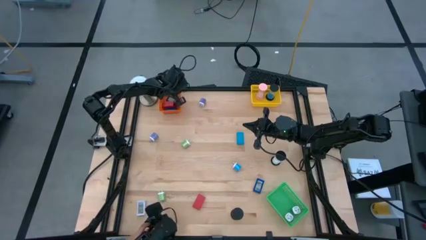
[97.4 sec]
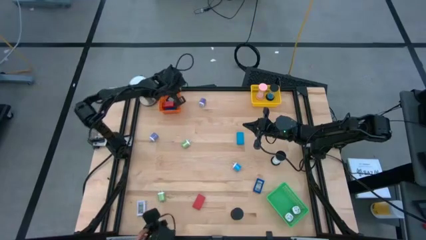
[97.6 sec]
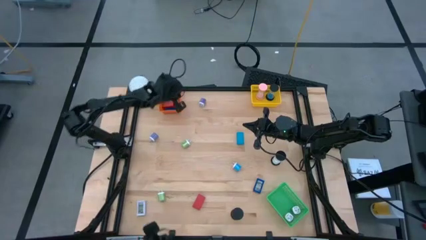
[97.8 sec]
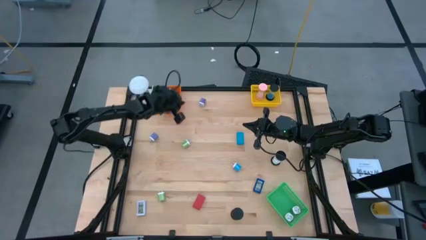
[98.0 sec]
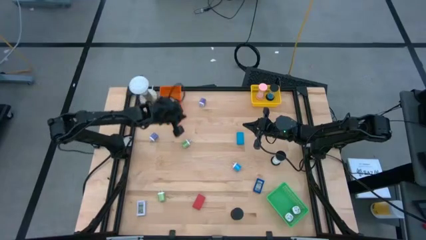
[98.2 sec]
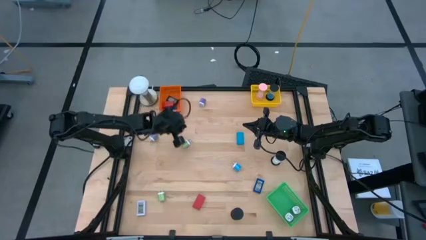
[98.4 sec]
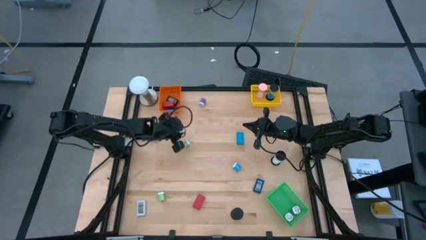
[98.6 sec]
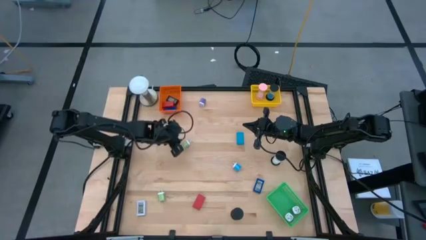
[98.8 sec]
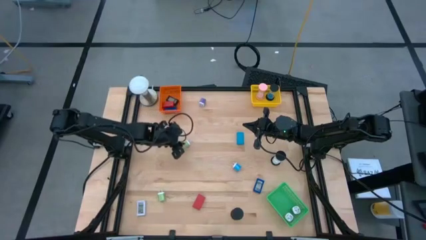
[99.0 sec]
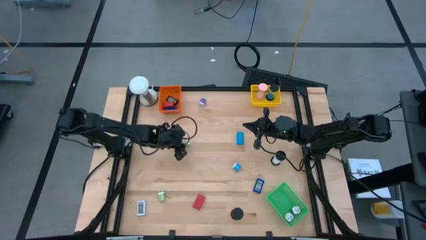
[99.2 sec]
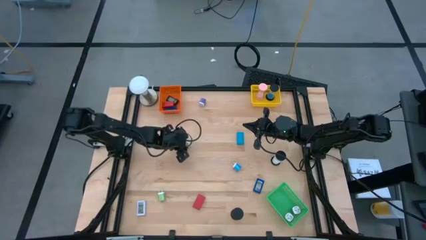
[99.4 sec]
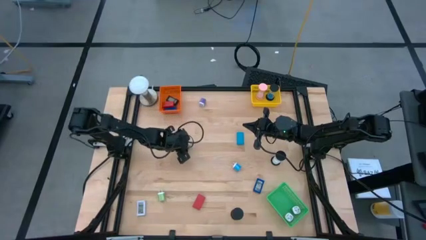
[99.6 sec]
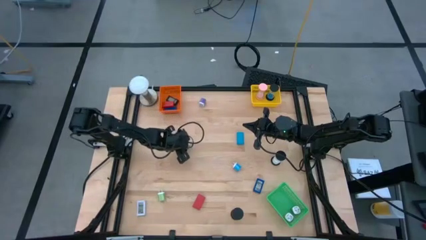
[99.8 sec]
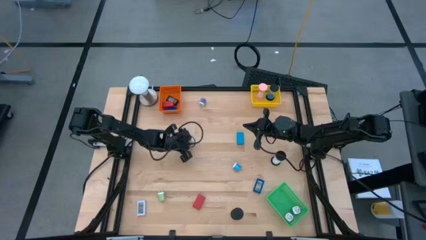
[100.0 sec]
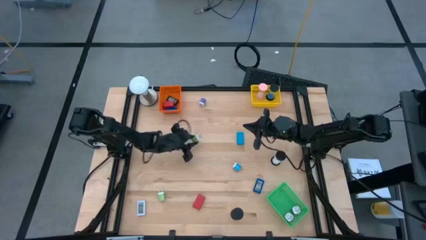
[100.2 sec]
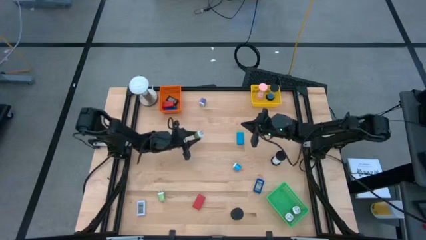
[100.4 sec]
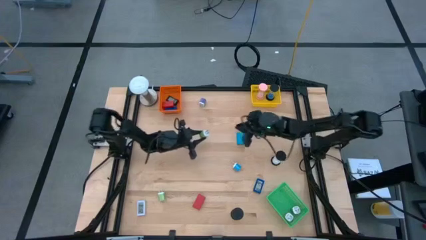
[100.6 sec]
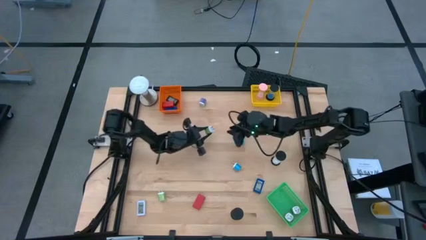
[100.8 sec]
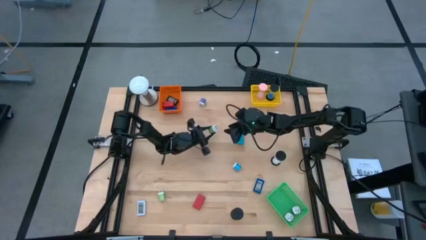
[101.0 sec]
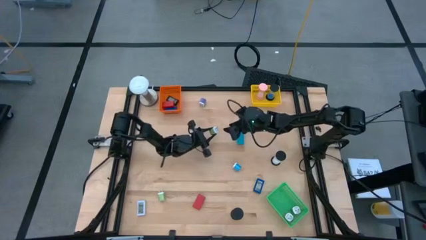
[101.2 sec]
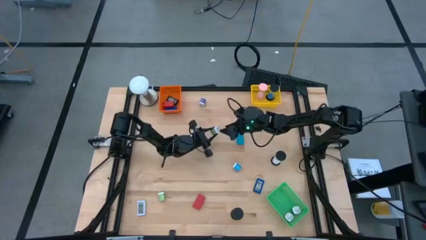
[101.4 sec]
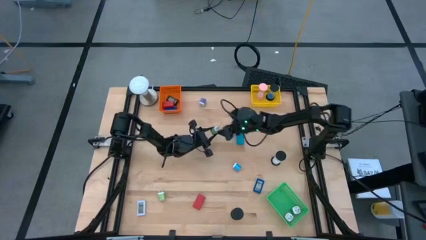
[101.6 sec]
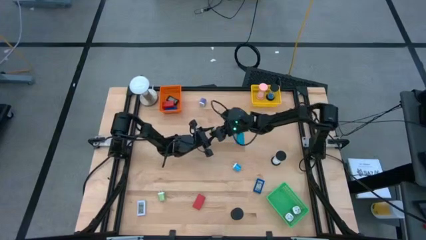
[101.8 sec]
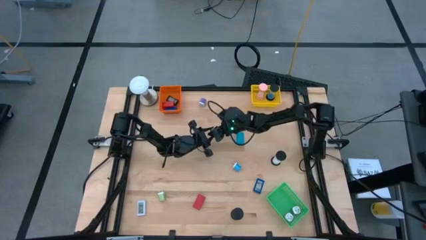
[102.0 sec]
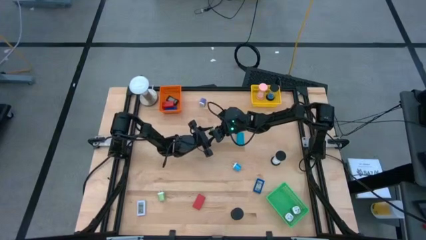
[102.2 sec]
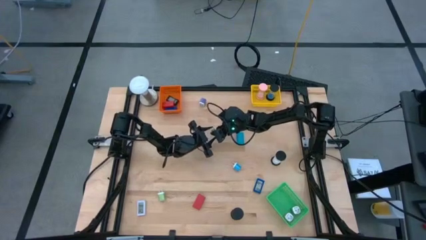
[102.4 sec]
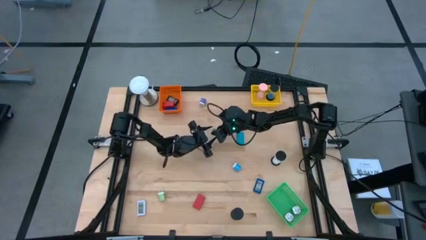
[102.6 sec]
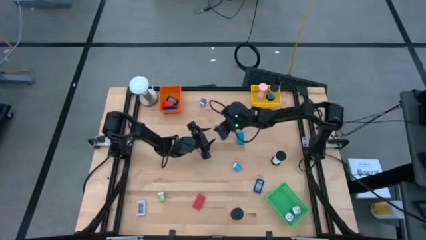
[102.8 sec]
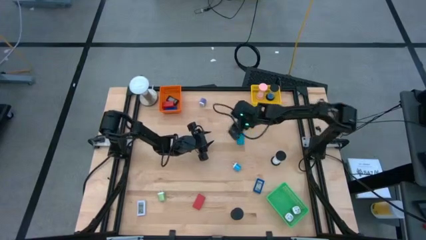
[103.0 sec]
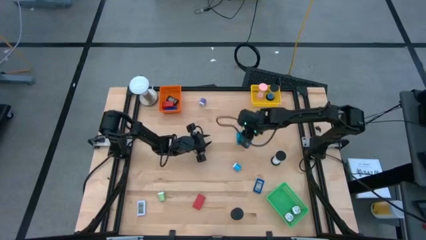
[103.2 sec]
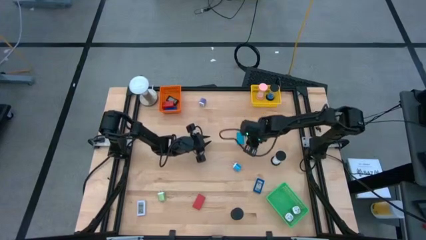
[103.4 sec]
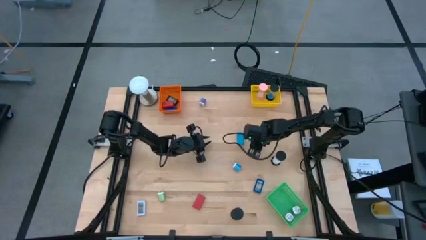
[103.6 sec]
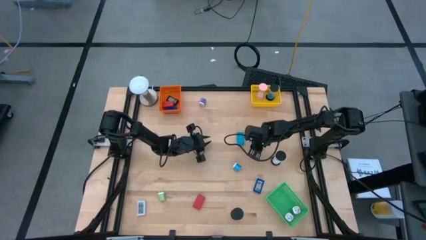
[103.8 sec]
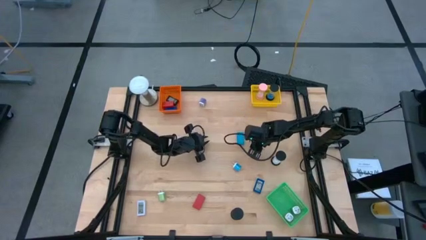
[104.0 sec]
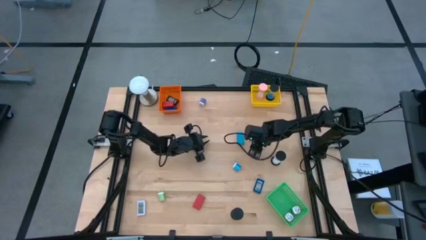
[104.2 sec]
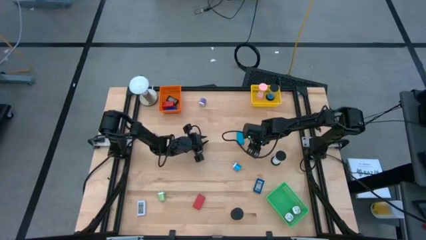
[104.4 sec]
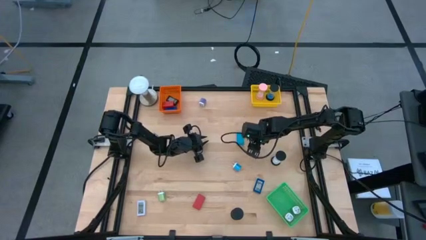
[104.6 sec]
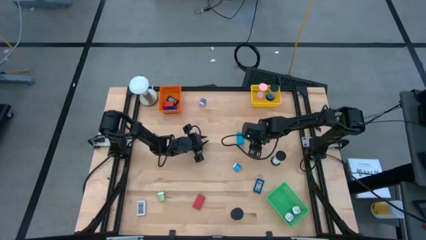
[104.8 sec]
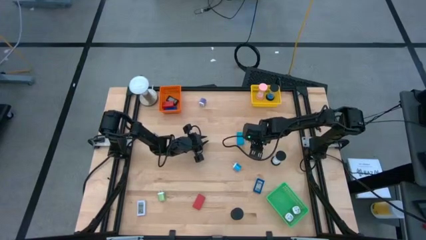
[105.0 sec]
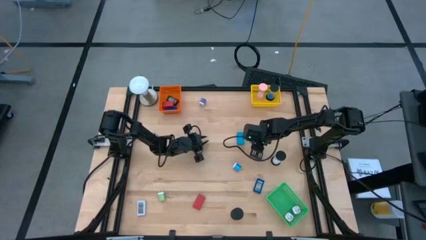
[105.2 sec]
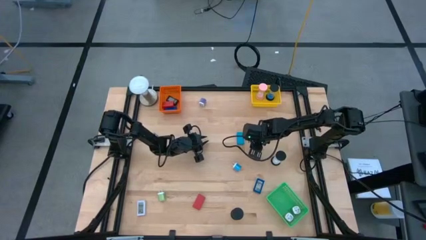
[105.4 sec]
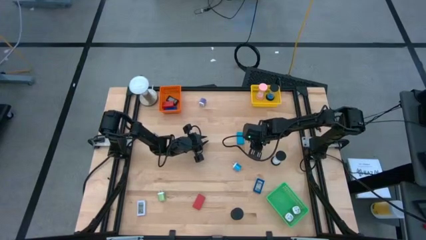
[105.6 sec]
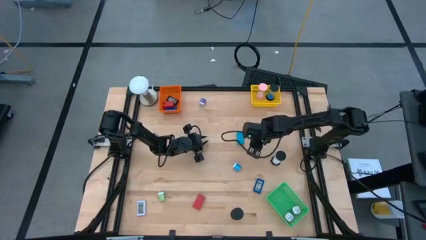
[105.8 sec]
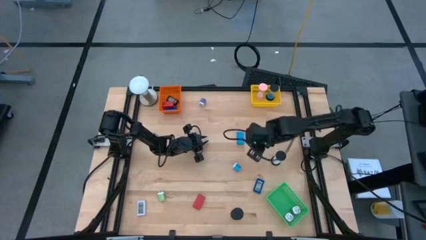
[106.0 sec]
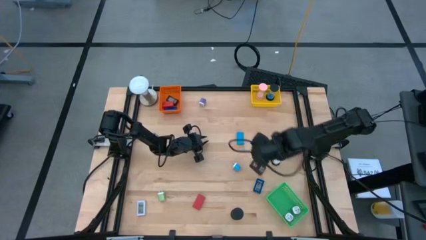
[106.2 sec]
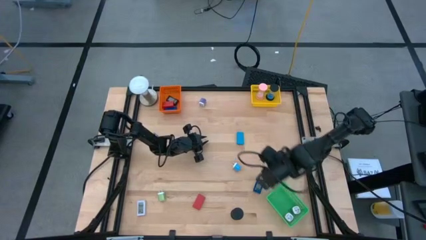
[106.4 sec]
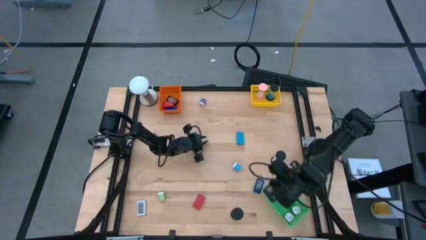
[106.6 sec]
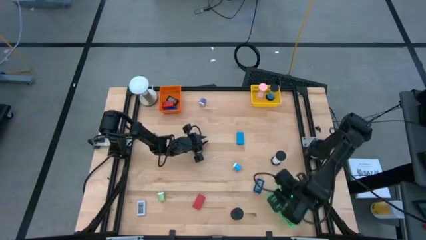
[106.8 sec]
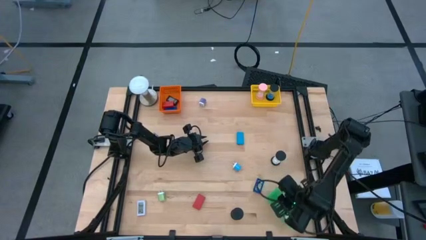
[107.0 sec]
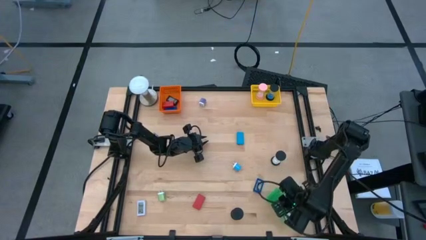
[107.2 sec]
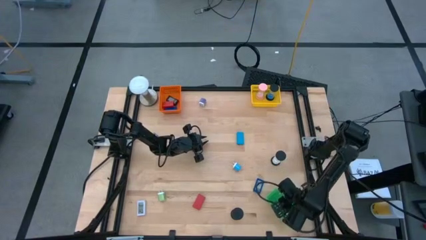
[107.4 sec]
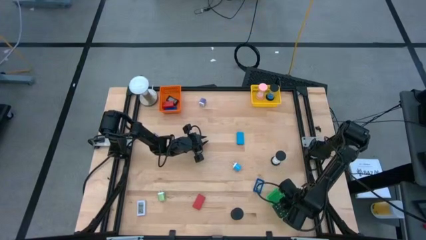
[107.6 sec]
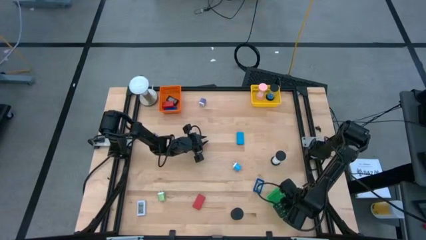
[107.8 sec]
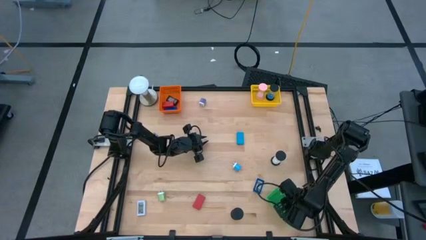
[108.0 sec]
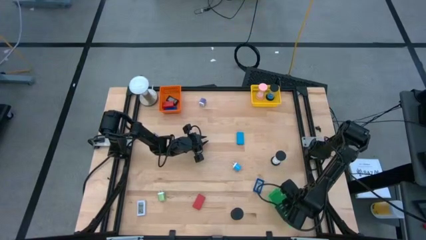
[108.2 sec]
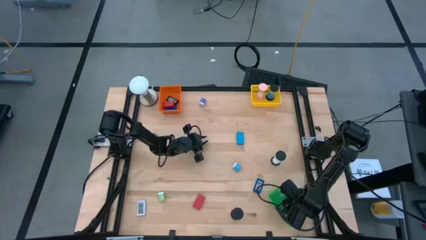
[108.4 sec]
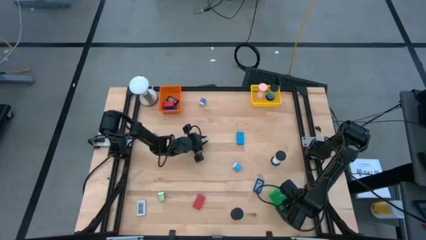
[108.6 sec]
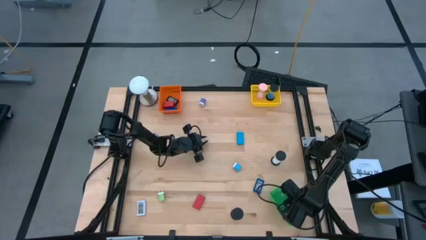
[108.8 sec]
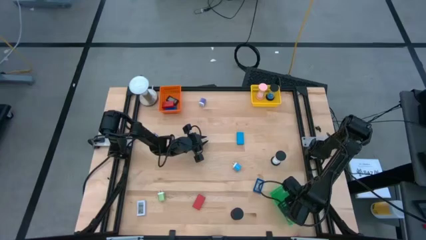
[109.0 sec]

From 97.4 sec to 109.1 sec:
Task: Pick & Place Office items
Put the top green charger adapter into the green bin

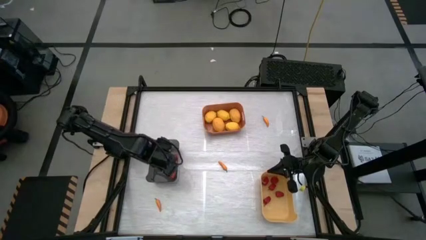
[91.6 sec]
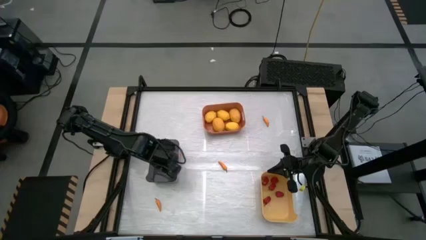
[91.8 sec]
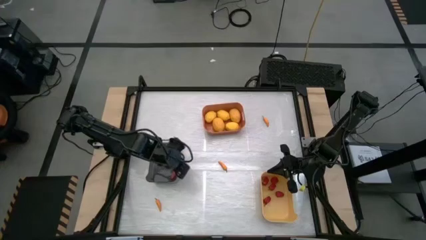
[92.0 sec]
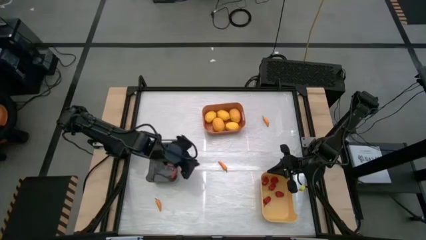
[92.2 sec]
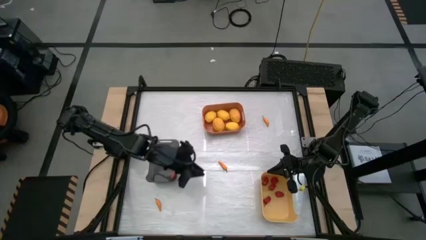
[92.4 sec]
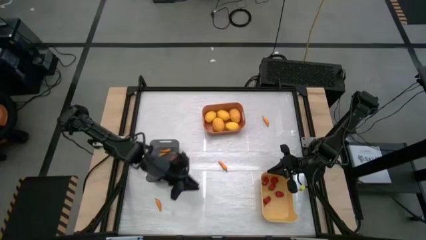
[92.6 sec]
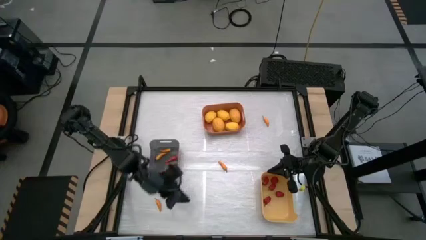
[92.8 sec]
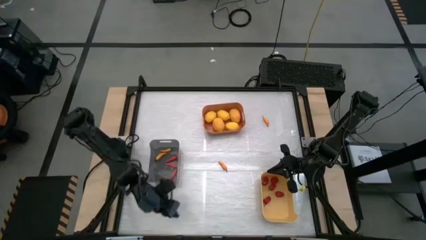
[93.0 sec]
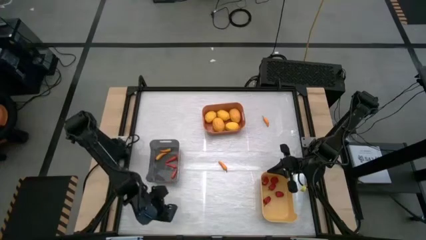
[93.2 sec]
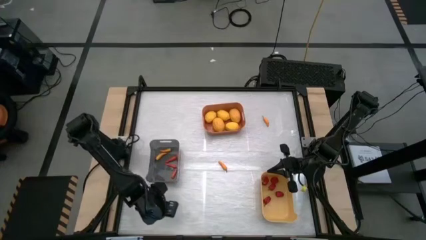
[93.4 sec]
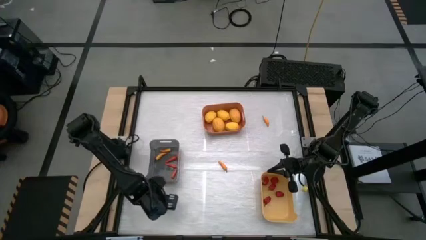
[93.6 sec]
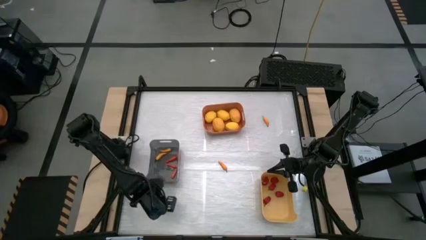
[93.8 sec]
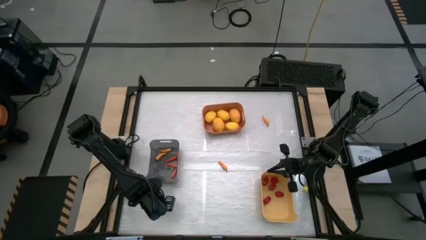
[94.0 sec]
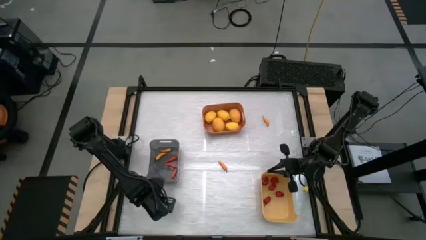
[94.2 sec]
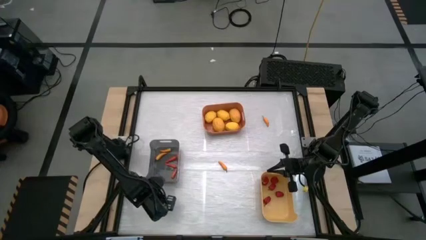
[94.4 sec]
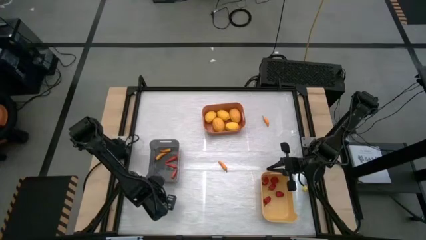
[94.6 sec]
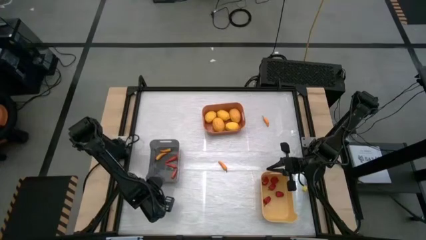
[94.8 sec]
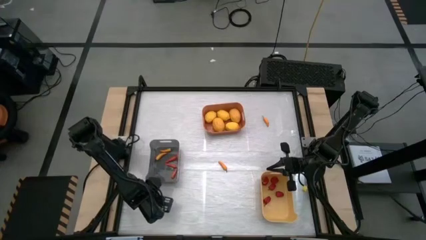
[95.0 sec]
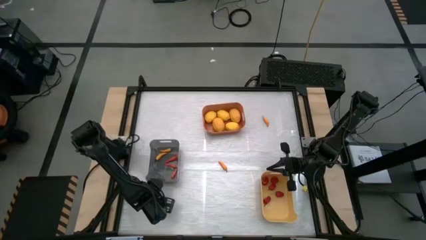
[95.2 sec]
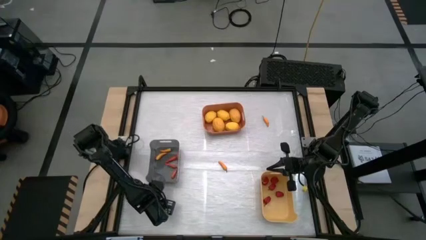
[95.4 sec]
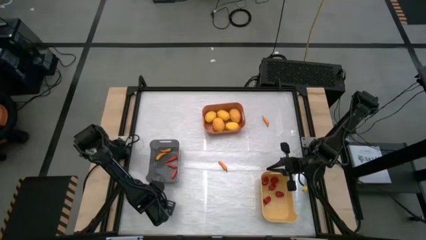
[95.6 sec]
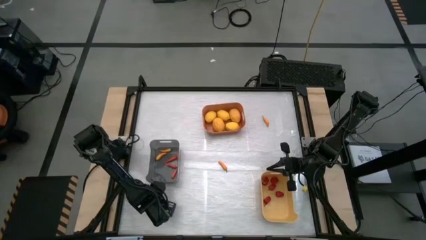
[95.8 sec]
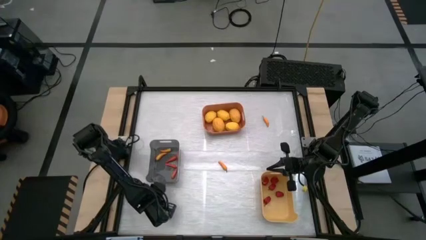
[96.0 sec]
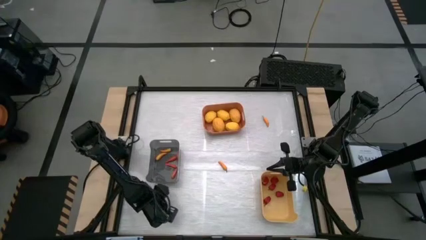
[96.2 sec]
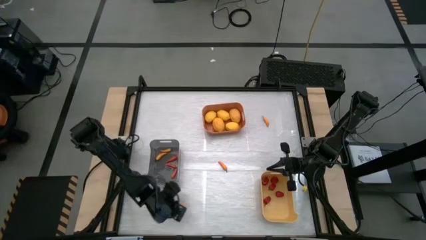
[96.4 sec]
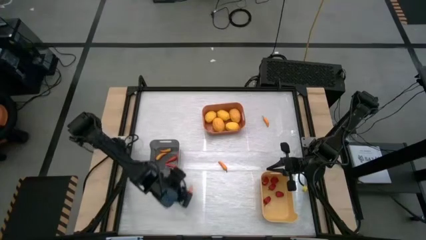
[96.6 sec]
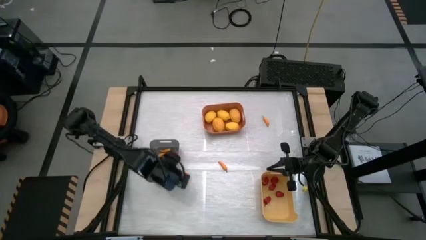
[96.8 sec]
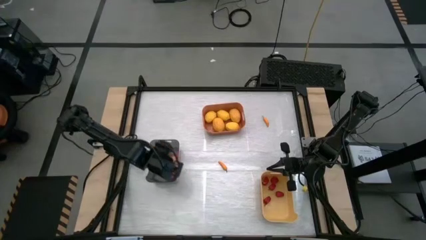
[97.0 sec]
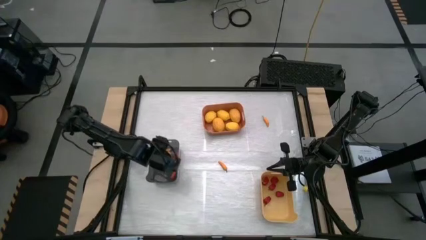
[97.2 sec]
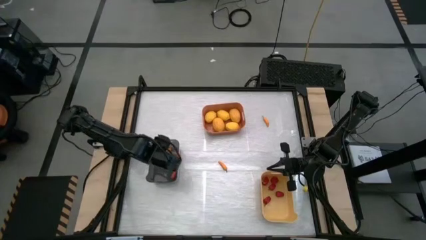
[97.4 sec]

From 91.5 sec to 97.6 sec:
Task: Sort produce into baskets
Put the yellow chili pepper into the black bin
